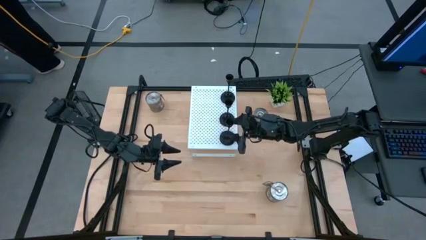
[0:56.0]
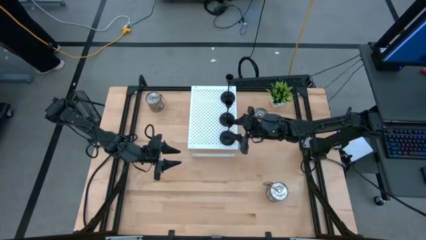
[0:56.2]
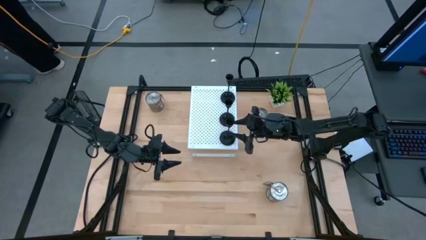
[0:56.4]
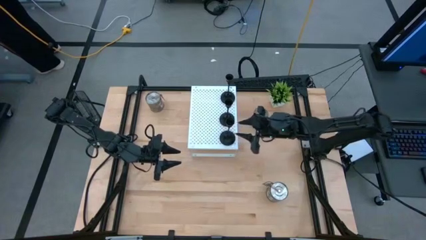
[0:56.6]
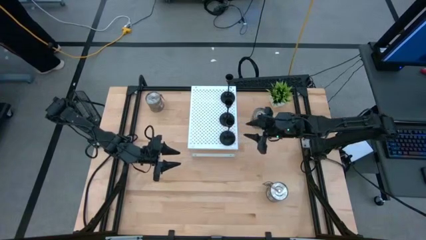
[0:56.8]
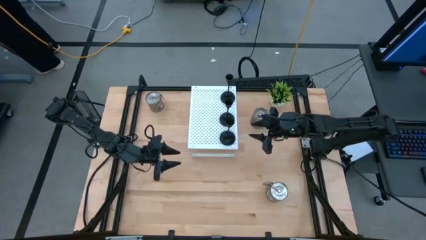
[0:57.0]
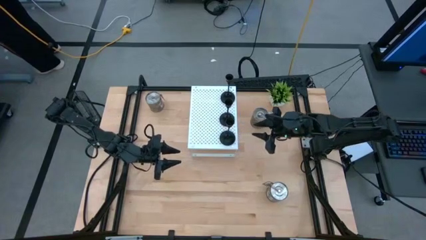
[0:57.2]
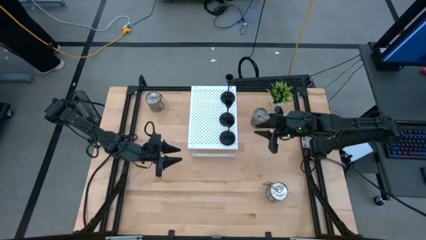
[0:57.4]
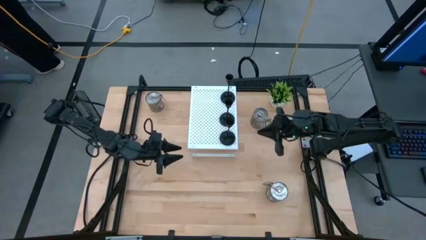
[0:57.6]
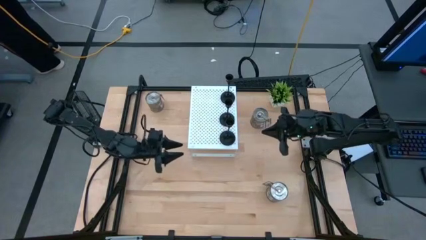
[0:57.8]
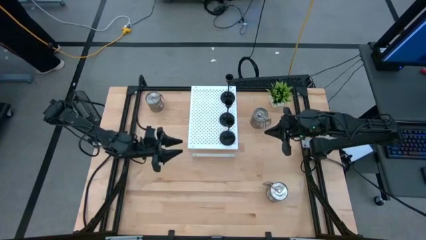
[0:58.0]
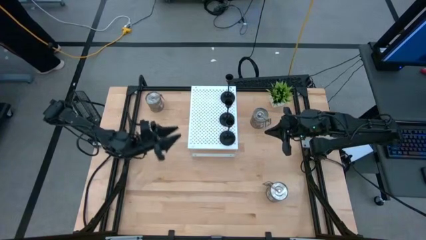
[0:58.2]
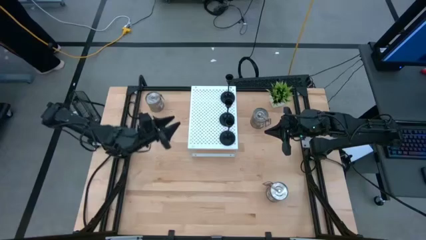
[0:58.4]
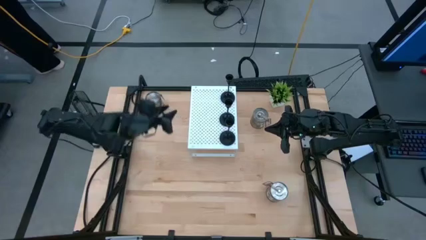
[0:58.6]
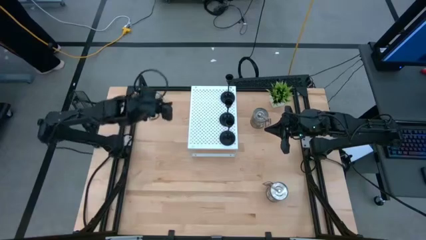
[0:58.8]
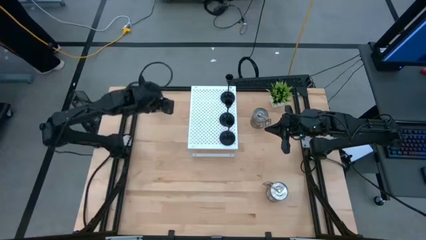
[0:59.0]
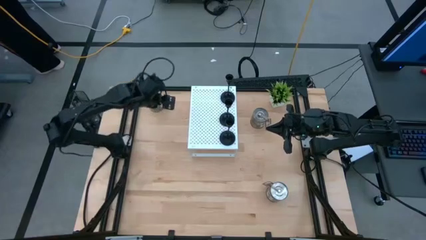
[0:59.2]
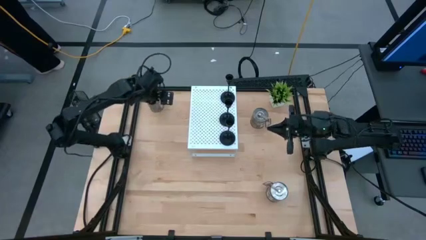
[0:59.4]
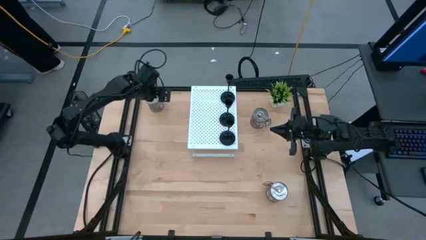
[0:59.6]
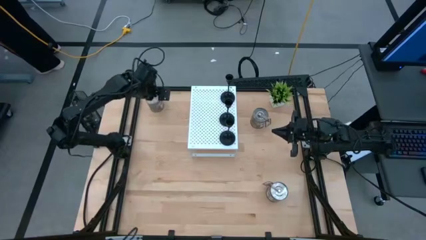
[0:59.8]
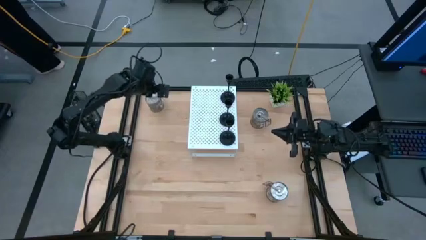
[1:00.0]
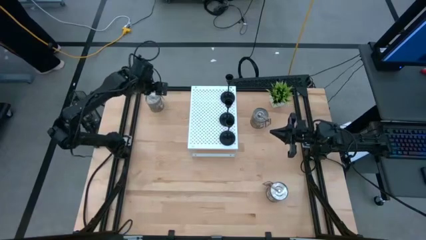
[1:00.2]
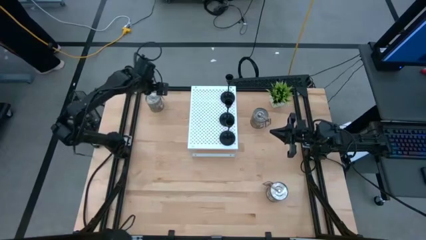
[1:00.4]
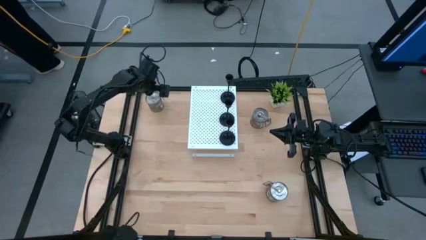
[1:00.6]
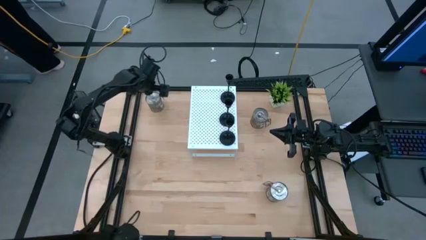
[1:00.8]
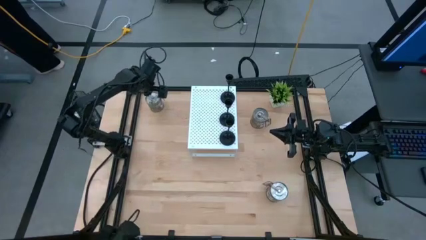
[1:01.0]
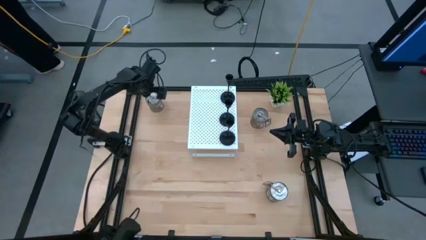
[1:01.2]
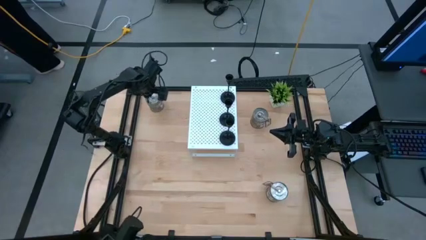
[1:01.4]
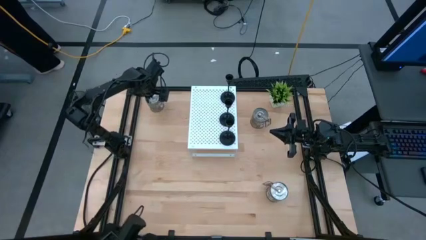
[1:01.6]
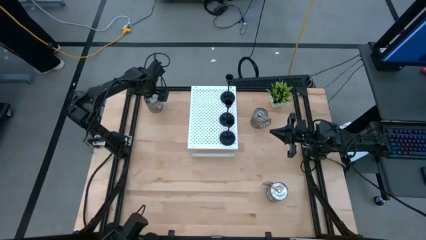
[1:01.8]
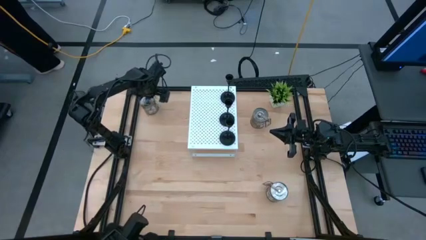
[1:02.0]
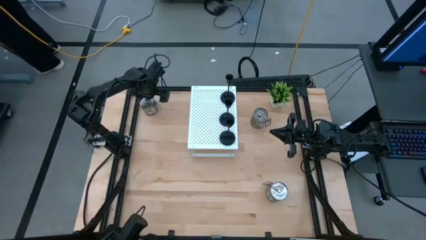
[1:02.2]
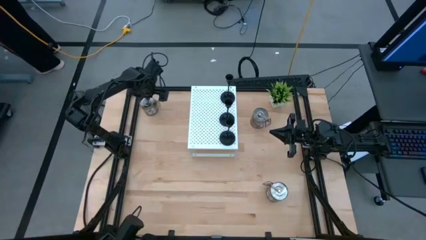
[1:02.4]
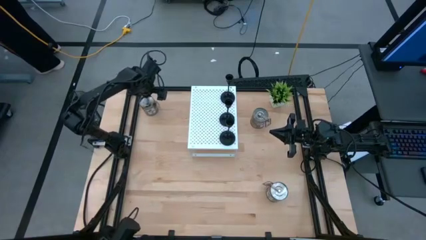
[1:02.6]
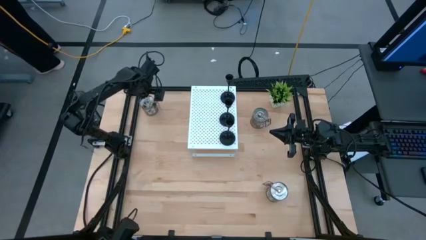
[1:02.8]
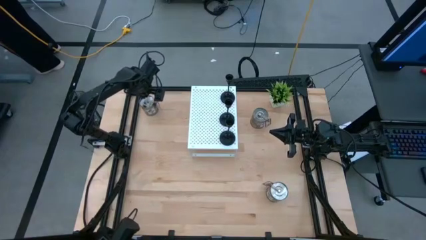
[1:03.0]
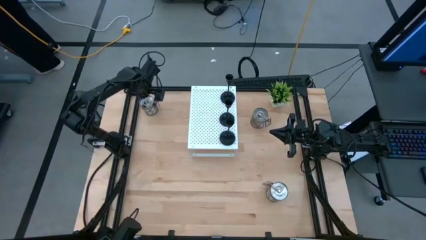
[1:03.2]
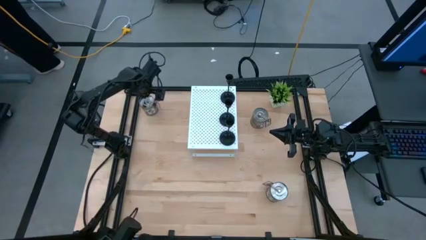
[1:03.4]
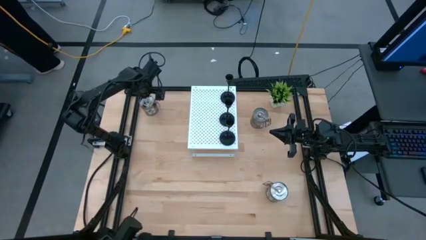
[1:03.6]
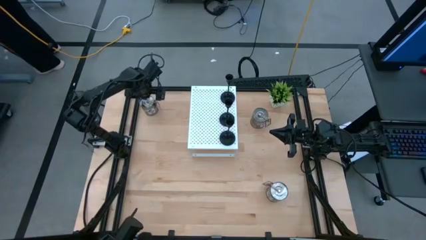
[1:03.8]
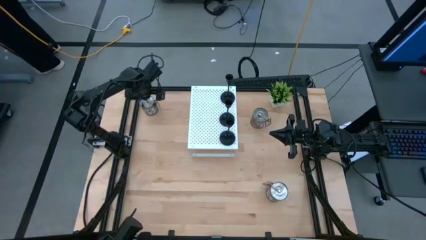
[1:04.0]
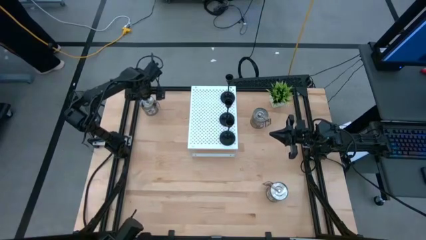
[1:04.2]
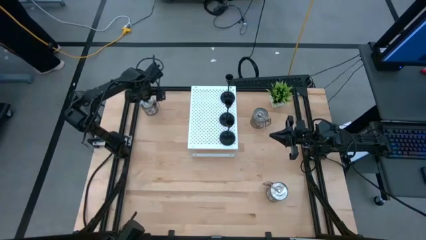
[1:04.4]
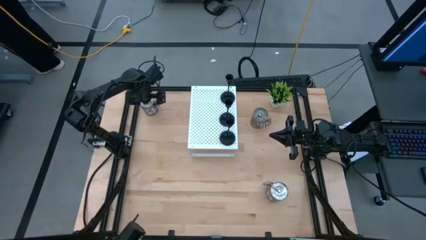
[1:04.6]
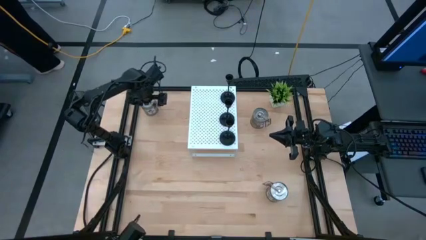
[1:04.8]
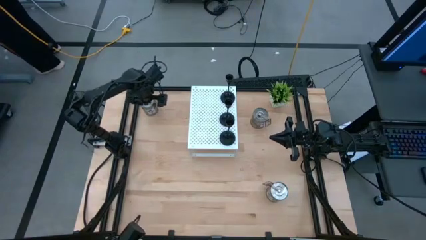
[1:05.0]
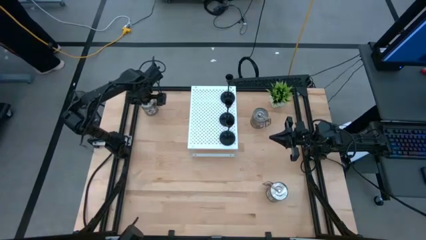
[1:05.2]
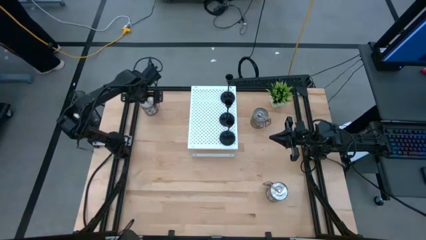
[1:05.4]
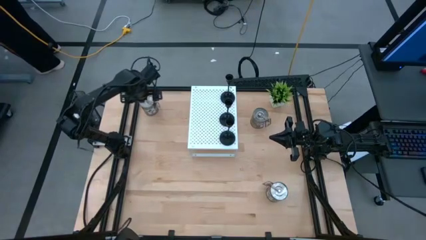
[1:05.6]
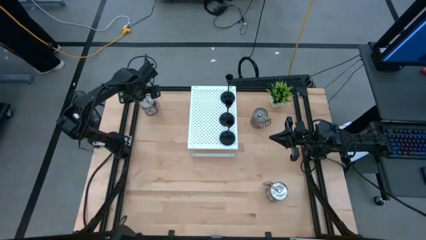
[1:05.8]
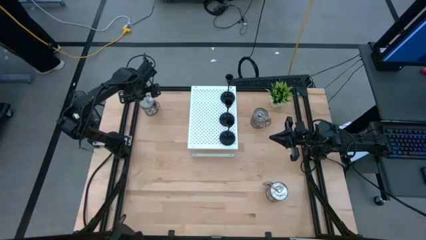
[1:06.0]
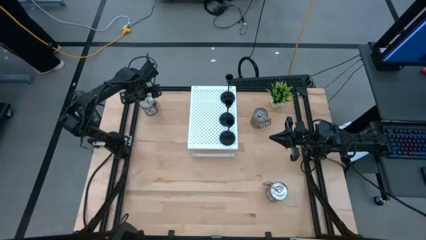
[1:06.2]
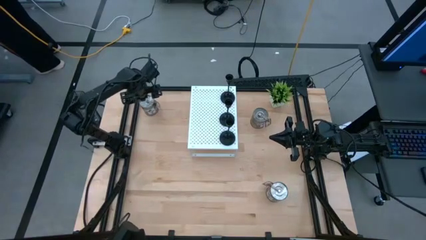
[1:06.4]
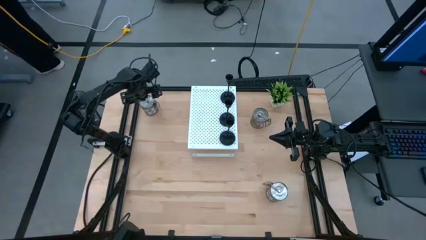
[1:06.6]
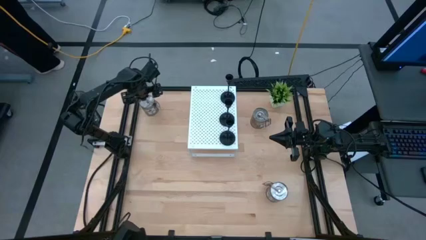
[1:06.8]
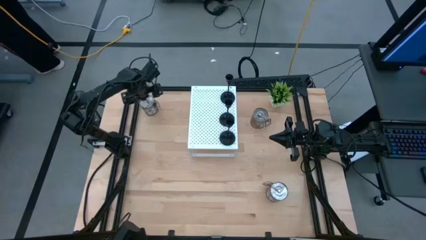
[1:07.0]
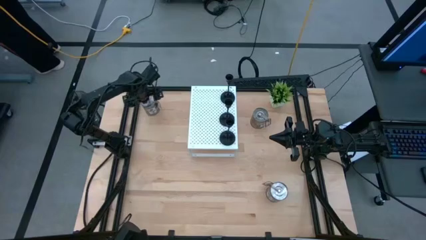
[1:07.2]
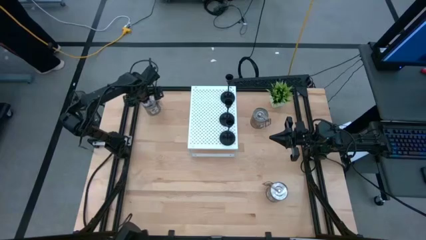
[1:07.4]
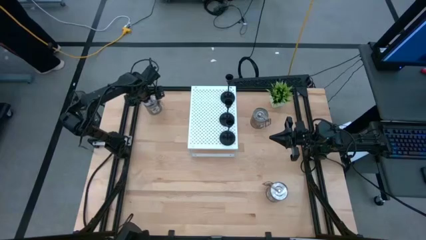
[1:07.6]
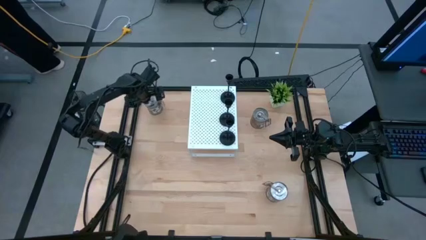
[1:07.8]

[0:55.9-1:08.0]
Task: Pick & Place candle stick holders
Put the top left brown scented candle on the shelf

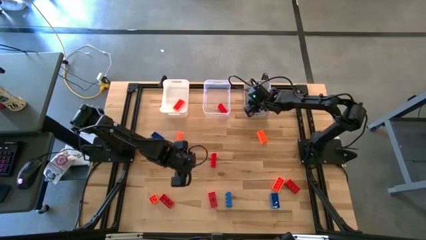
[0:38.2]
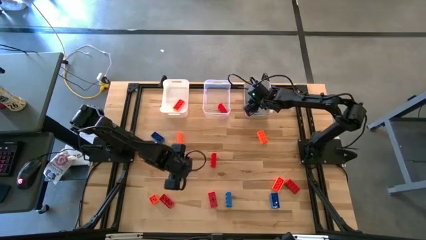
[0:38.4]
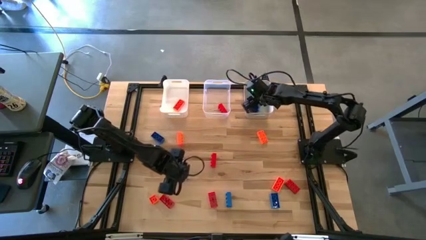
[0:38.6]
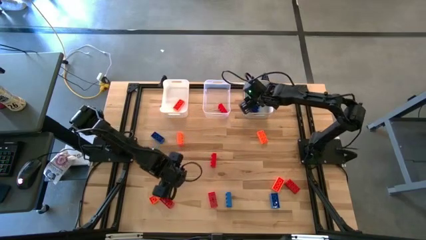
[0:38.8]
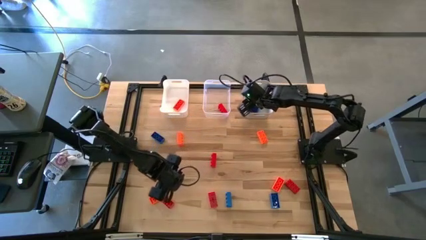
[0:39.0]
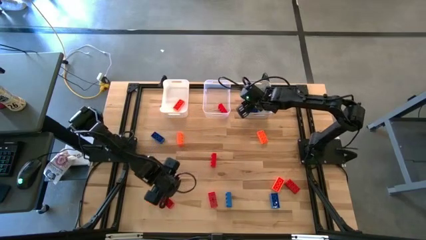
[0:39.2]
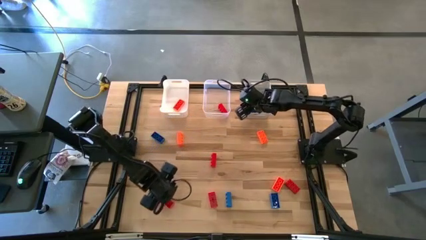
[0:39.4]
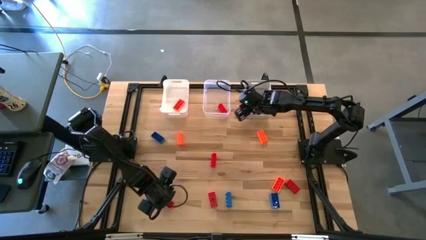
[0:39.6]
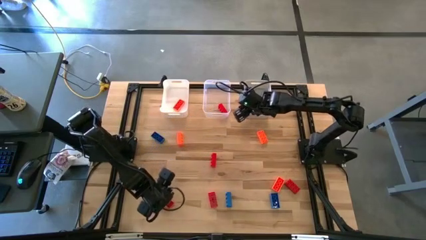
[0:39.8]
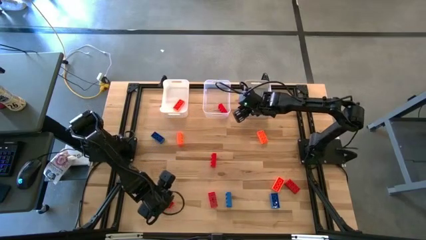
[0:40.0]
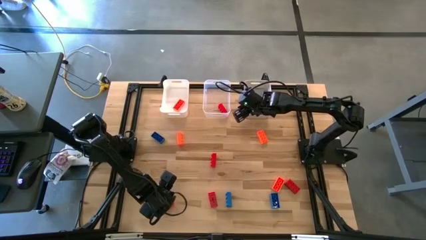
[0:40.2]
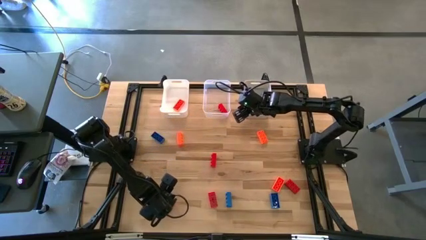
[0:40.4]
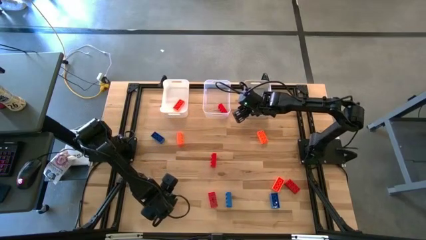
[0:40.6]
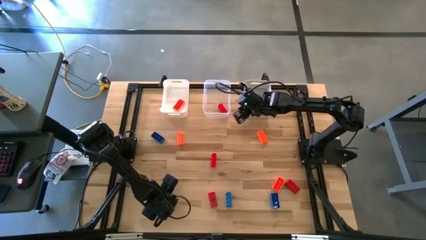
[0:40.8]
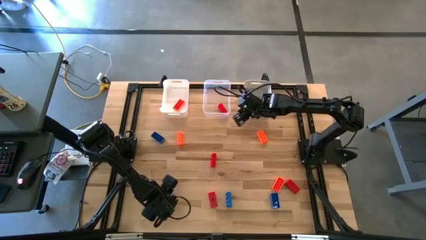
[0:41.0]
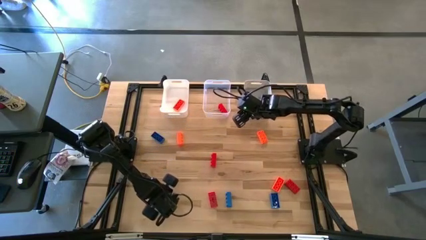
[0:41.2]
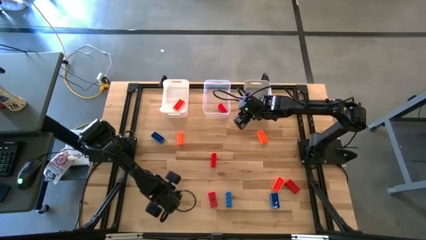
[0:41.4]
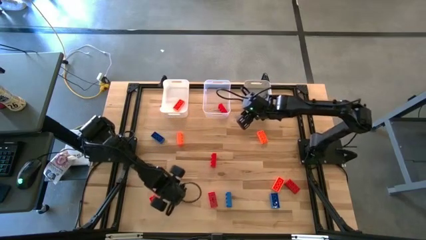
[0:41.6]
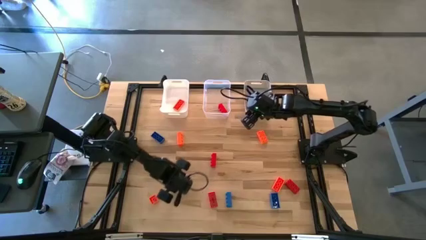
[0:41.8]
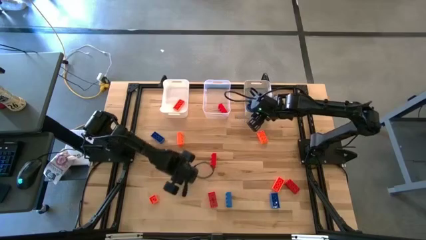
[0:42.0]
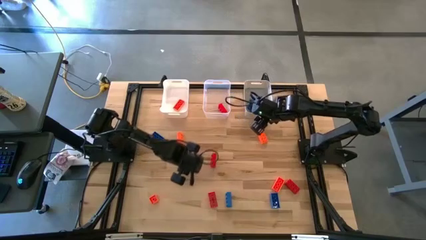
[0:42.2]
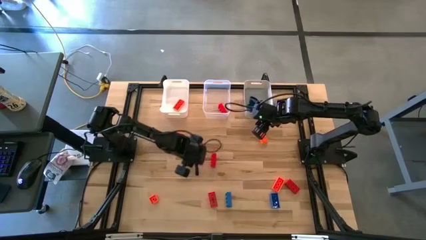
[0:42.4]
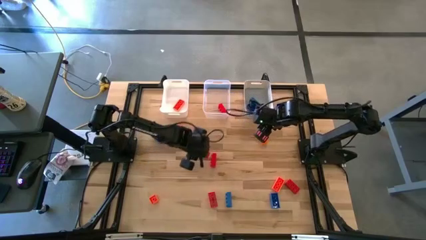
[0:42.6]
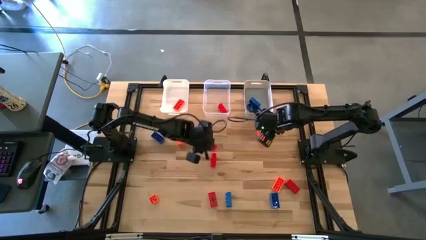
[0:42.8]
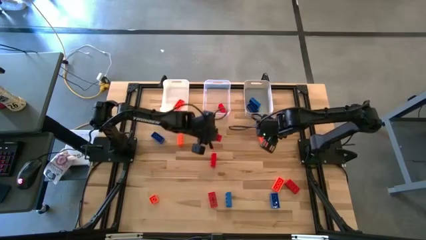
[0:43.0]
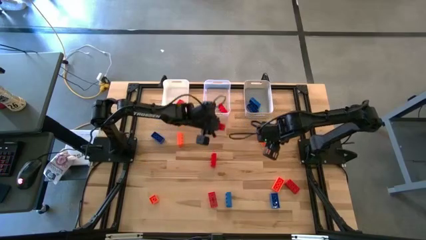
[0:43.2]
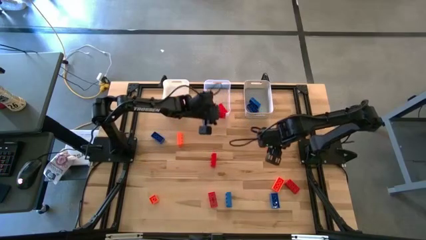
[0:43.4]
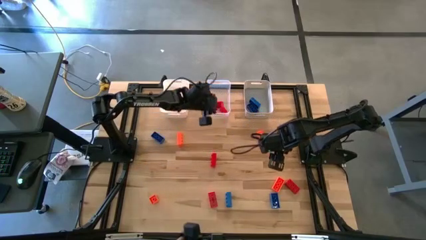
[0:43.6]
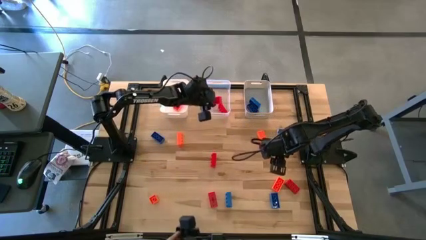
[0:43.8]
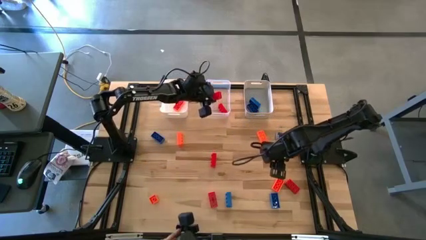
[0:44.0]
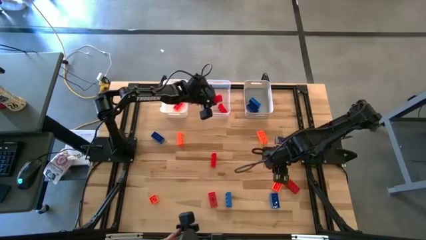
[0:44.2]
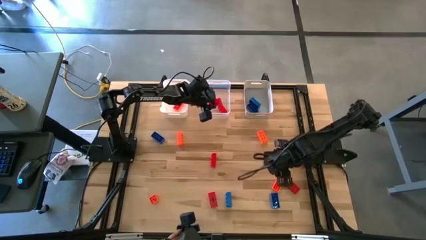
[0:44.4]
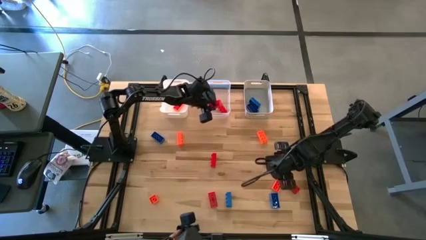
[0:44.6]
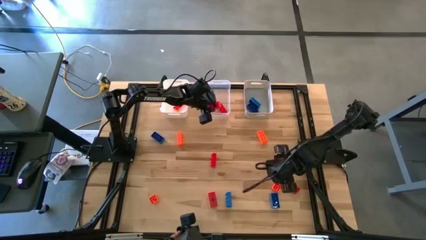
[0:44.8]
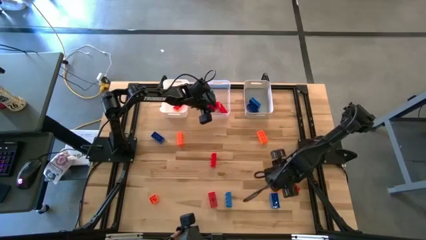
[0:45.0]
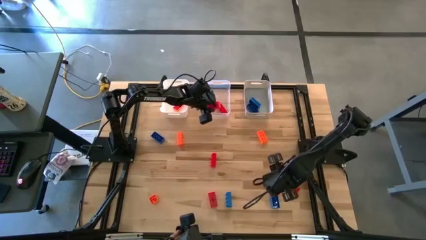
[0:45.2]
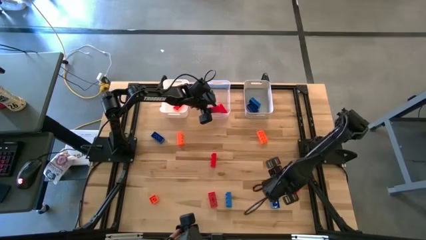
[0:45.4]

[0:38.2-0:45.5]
Task: Sort & place blocks by color
Put the red game piece into the transparent bin
